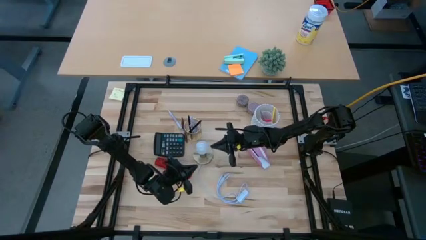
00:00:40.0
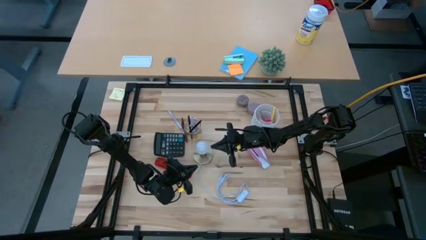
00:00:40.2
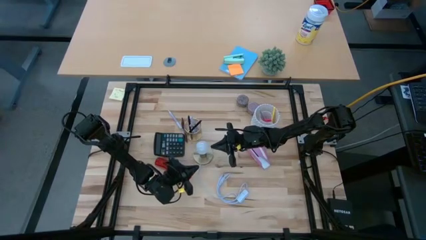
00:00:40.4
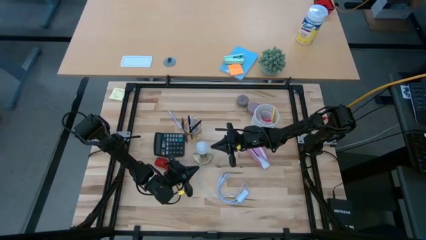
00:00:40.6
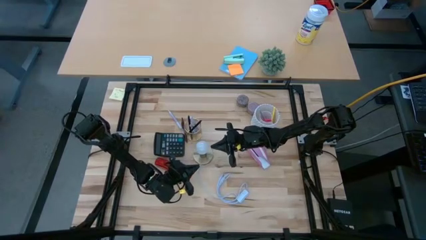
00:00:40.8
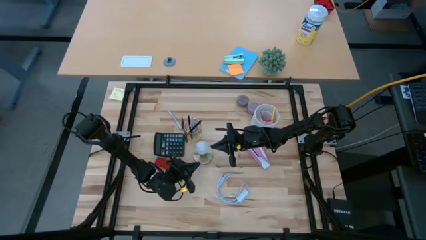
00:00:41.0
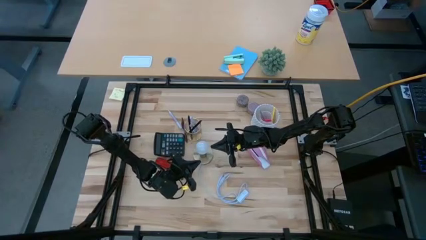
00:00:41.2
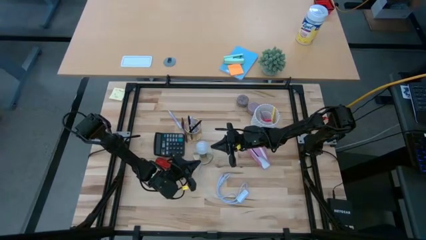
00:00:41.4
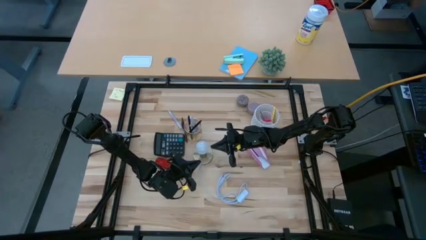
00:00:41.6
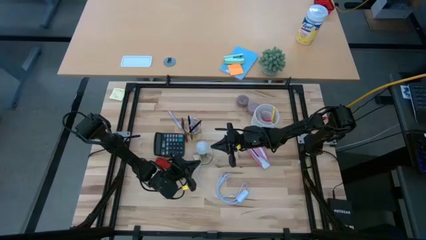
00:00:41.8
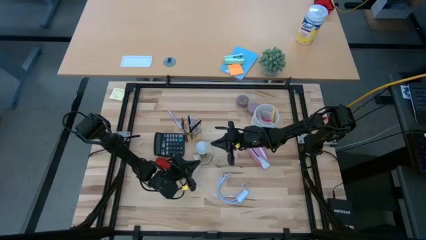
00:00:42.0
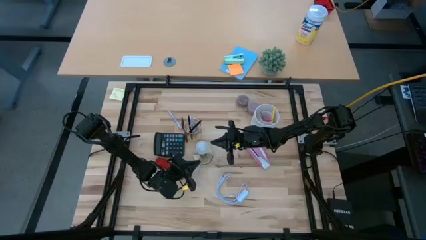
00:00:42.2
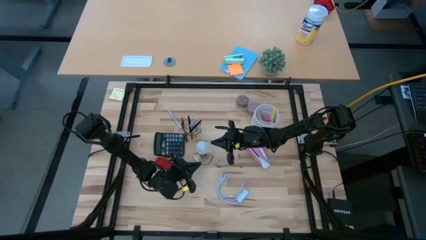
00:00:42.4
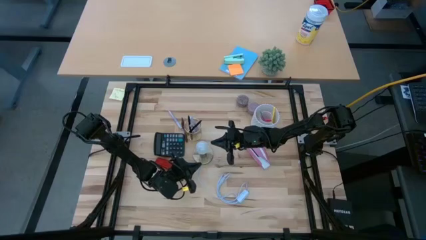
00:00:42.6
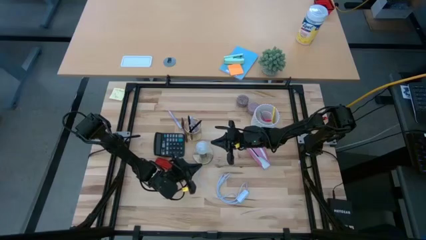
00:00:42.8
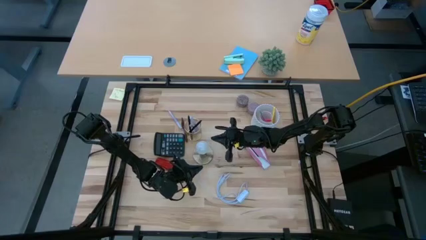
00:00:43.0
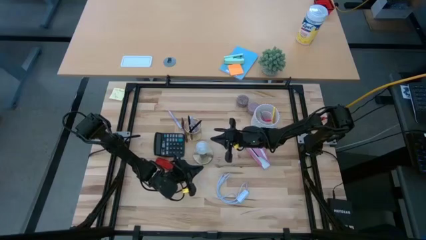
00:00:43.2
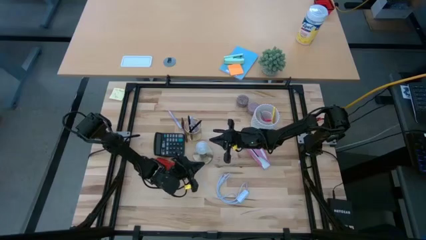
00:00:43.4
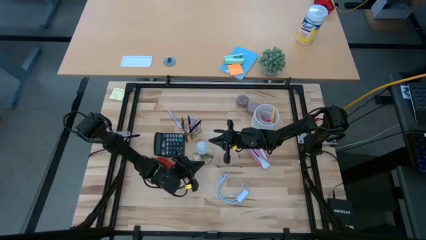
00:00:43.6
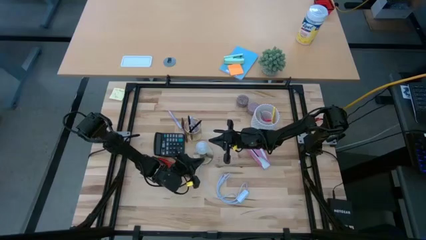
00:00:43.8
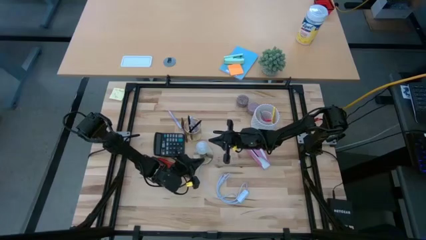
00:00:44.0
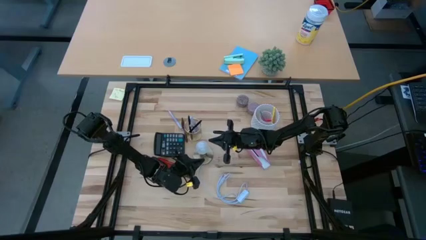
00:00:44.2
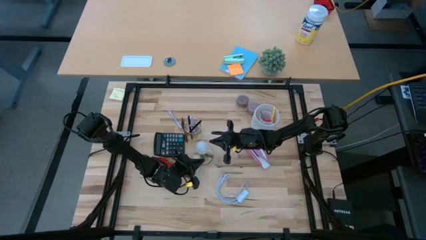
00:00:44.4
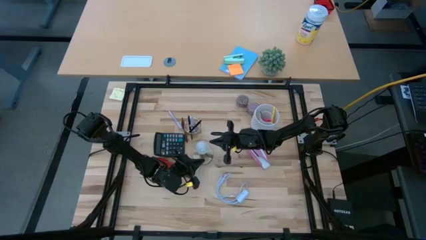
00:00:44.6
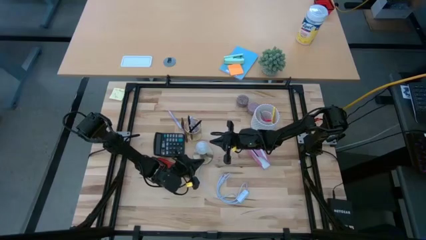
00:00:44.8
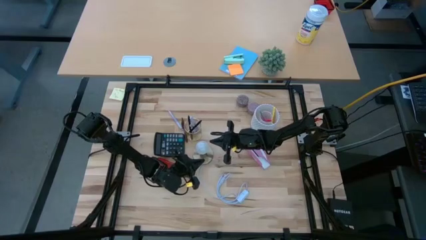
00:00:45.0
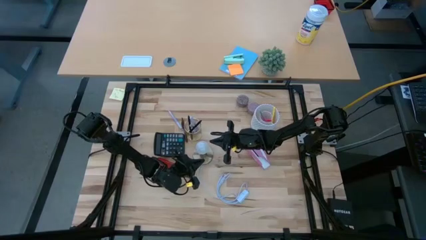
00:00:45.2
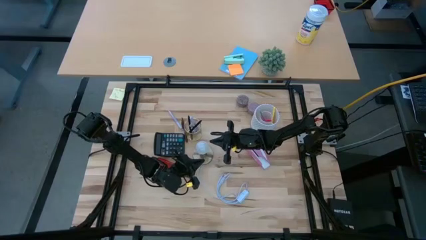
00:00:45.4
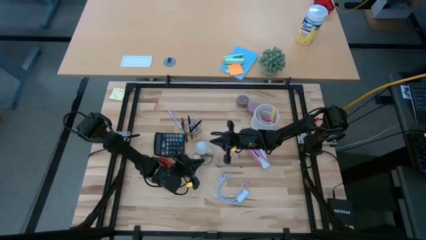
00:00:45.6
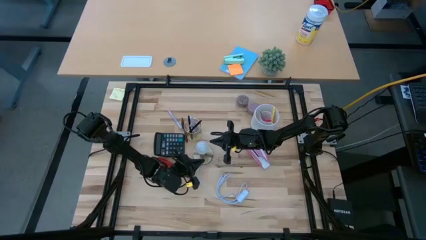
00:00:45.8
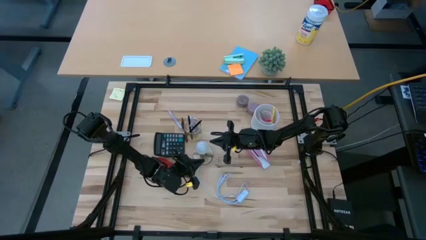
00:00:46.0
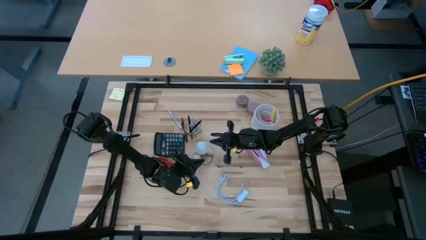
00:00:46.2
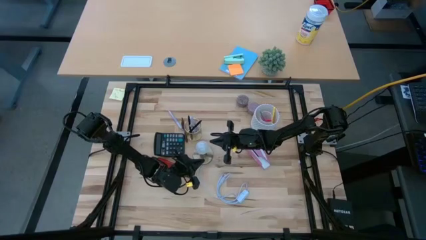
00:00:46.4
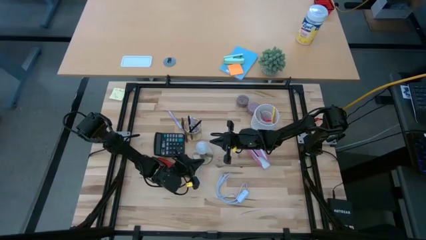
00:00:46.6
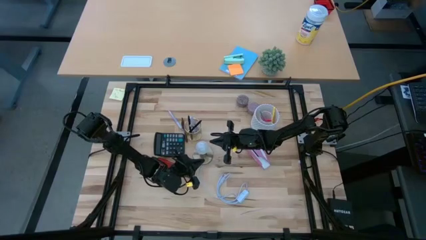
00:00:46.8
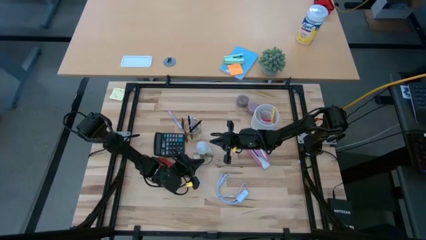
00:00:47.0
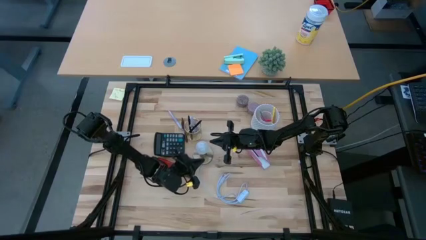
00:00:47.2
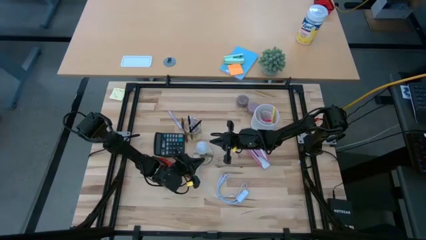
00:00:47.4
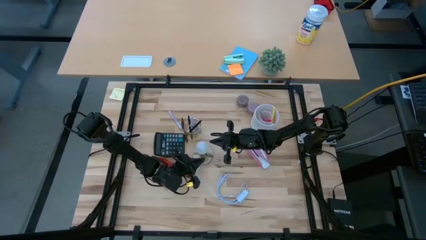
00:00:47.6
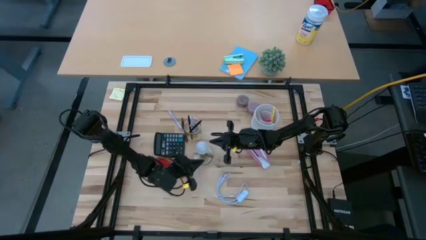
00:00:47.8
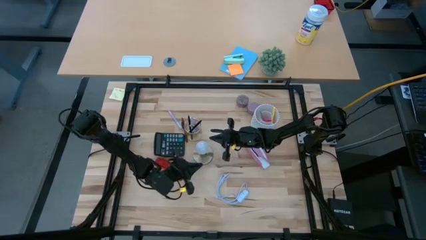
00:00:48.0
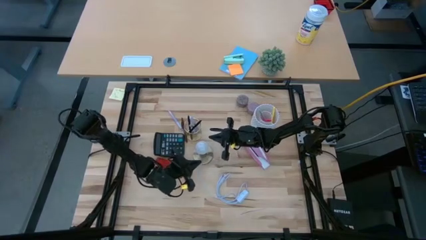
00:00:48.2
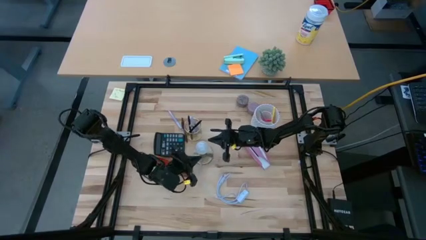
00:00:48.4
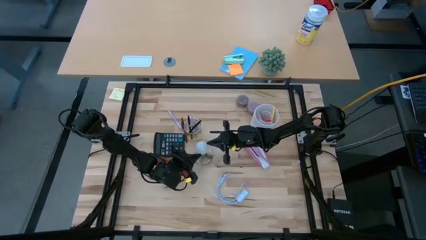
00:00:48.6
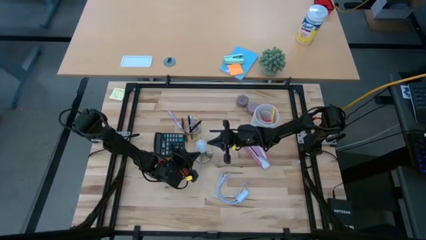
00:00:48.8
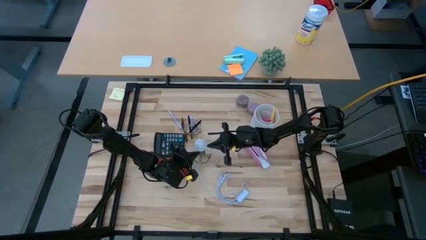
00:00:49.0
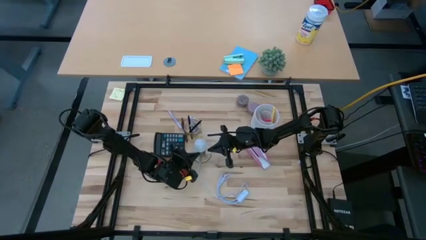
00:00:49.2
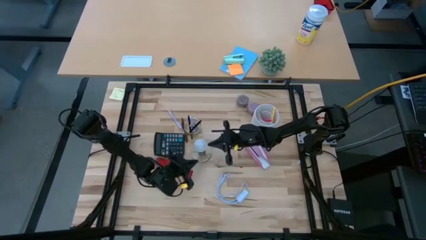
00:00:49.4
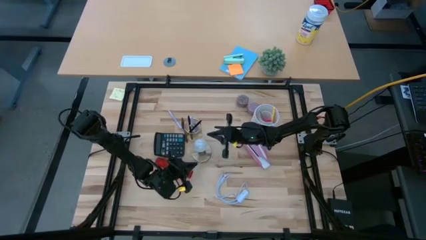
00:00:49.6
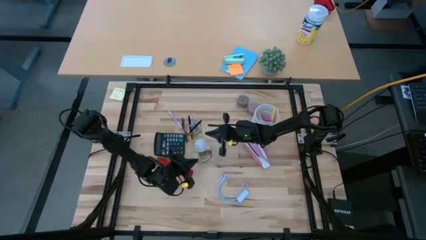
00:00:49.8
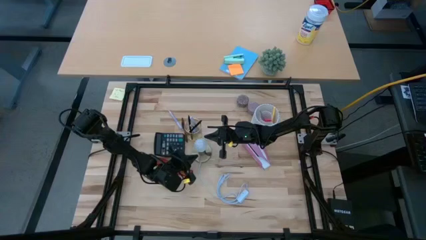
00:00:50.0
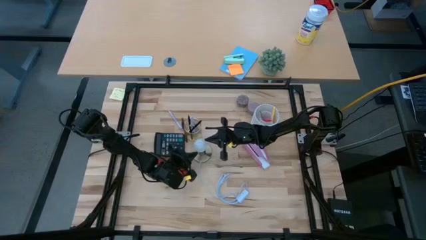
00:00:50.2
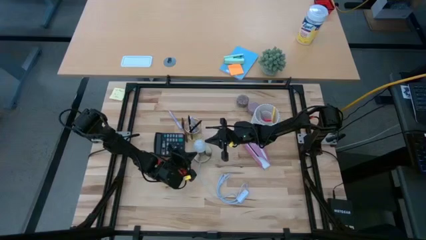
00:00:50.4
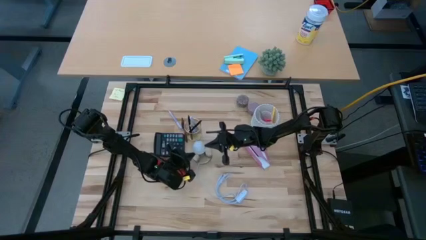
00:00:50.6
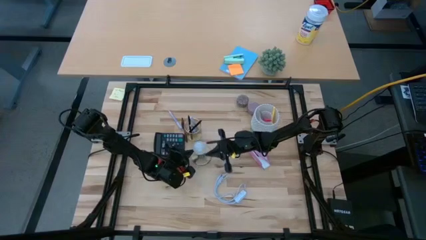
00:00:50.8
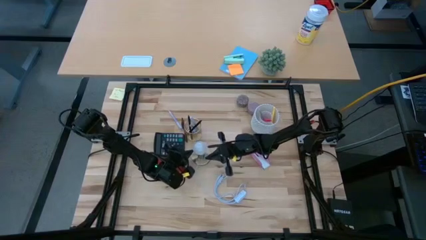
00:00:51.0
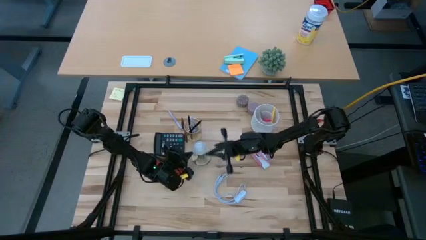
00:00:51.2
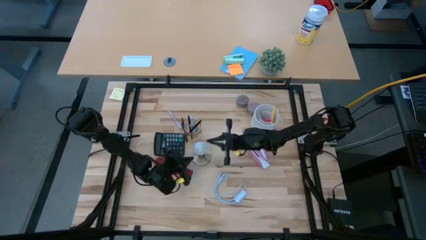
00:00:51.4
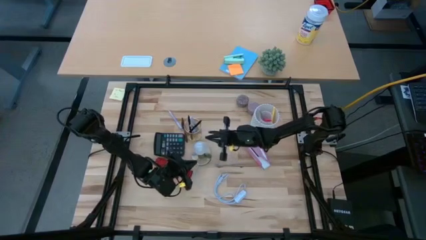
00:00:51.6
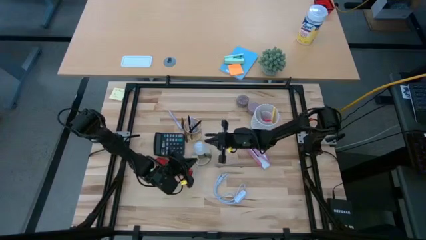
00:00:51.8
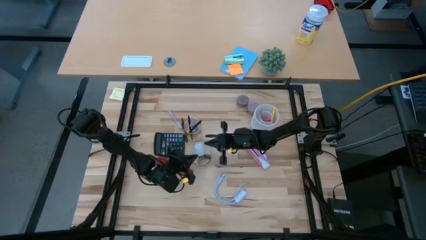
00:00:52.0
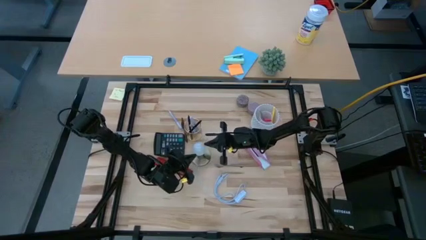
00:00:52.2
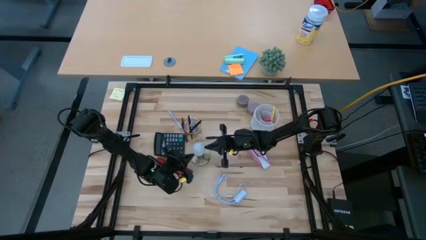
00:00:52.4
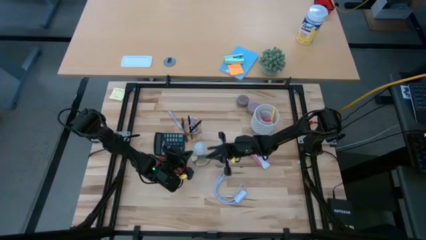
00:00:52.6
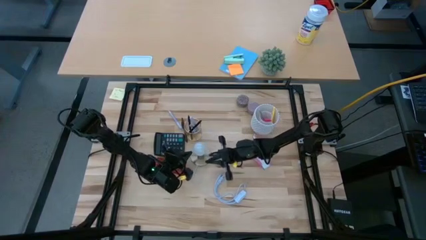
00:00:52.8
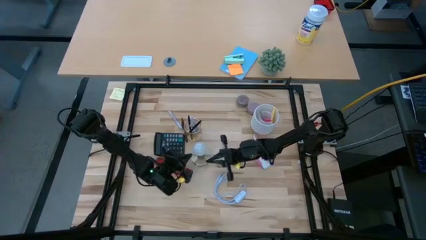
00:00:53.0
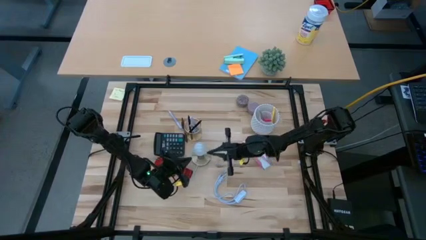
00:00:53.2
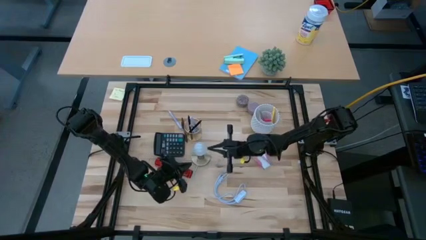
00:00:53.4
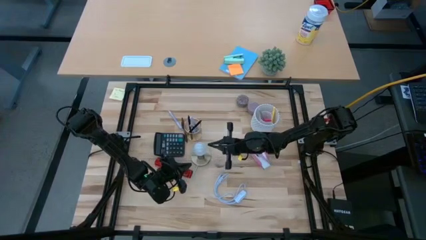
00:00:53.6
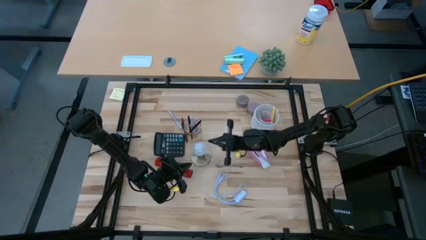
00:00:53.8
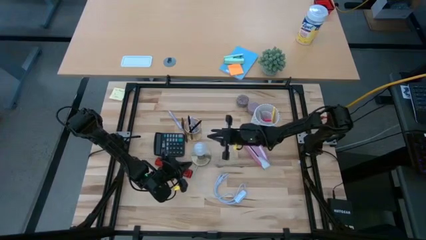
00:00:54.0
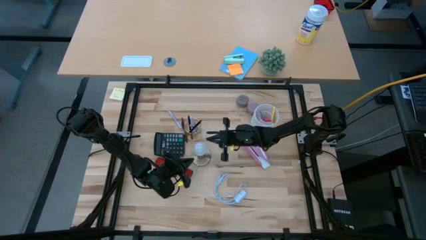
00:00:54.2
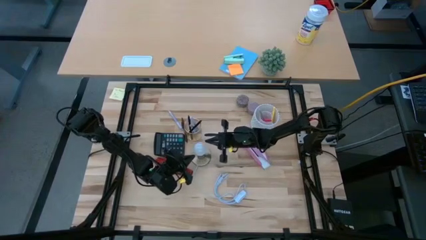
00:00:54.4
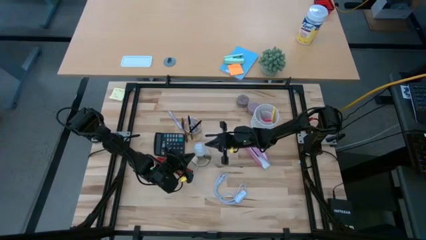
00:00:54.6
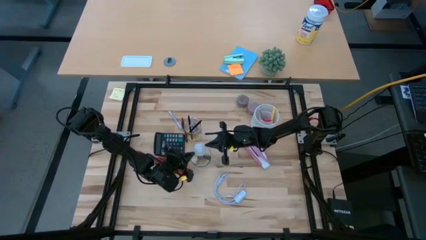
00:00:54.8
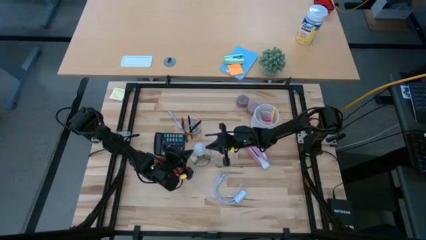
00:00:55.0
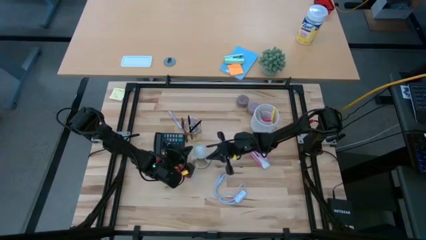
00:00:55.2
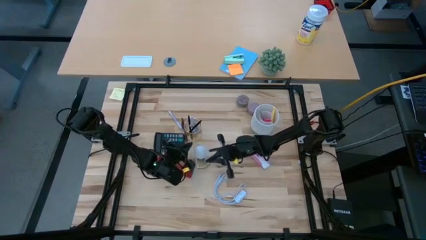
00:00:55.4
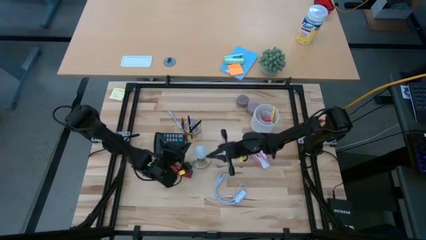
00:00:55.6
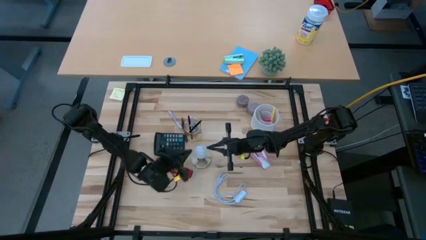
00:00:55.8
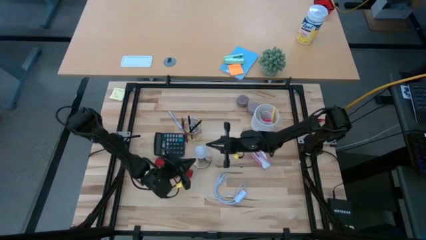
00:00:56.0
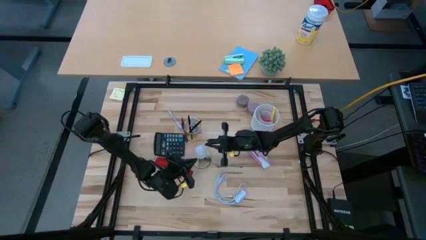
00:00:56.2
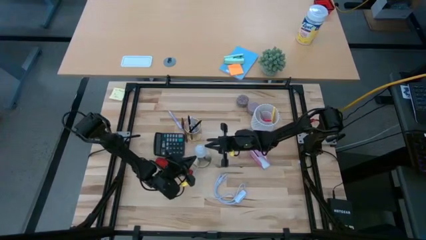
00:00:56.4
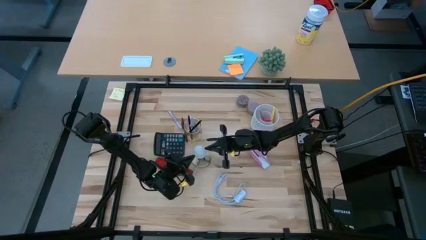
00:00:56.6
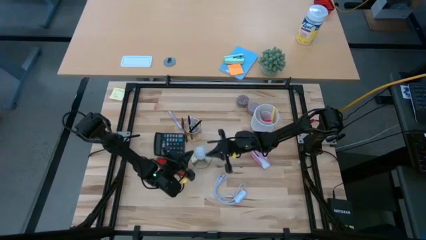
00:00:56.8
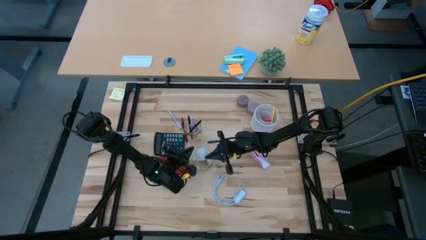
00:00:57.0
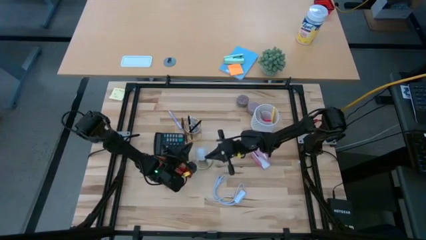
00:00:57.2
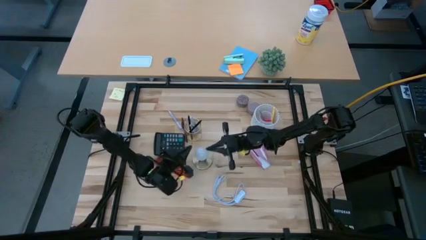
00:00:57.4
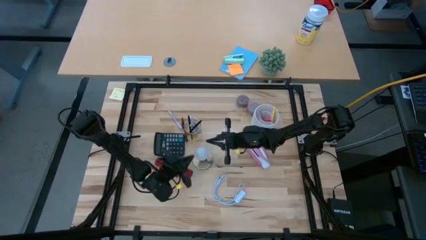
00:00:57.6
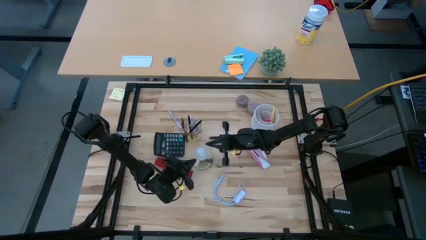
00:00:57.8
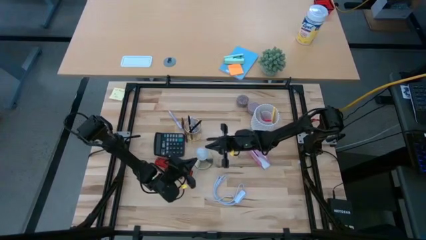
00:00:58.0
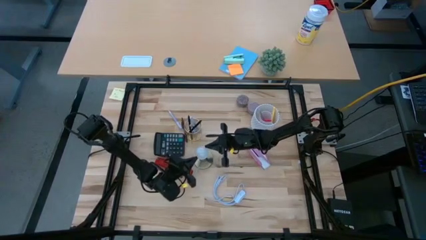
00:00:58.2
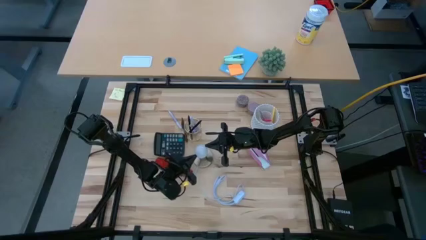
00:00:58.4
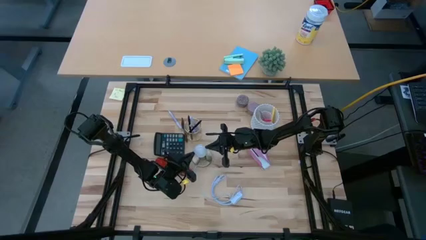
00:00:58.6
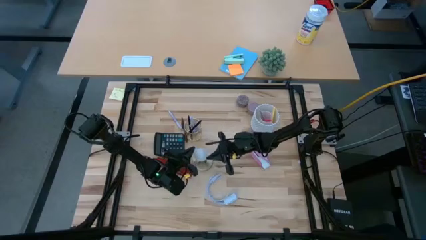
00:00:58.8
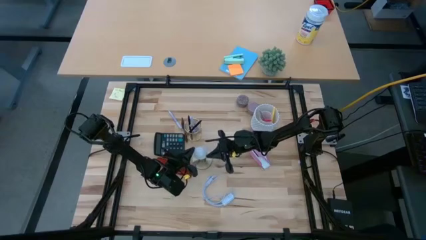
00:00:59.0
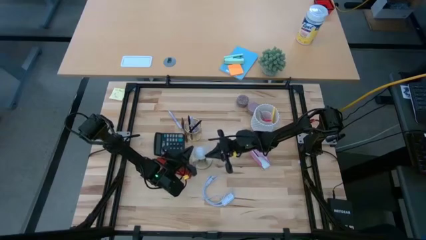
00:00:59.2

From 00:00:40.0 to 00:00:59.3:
Task: Screw lightbulb
Insert the white lightbulb into the gold lamp
